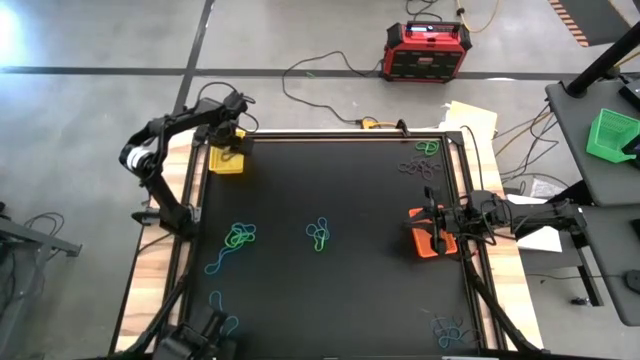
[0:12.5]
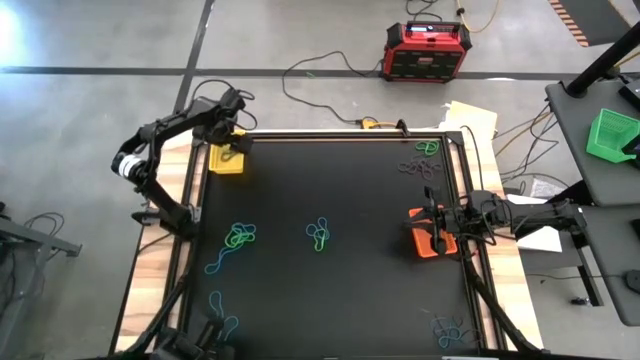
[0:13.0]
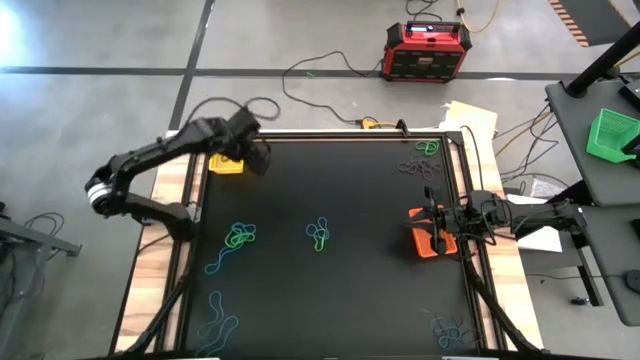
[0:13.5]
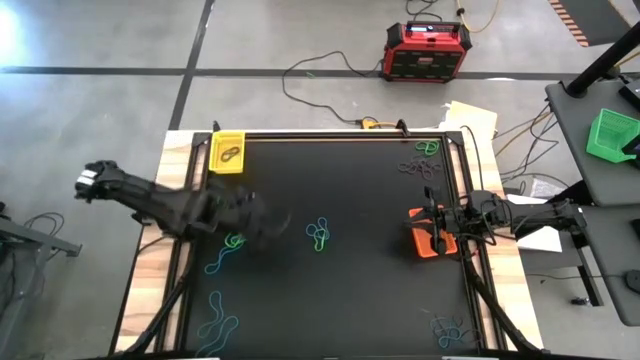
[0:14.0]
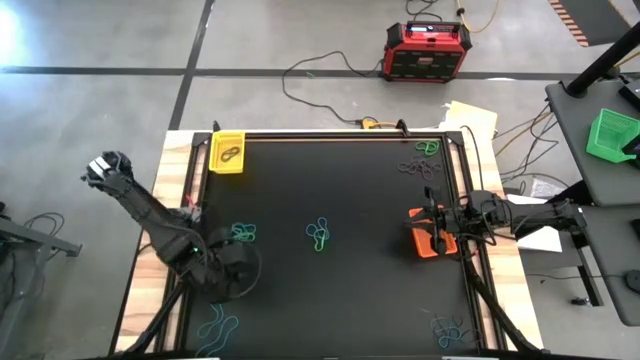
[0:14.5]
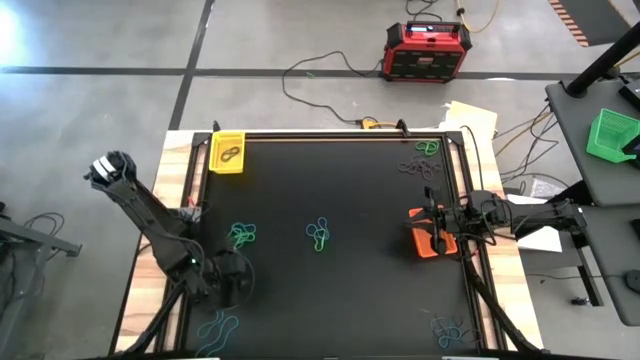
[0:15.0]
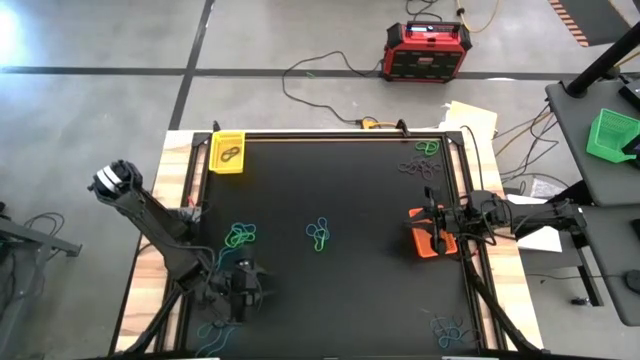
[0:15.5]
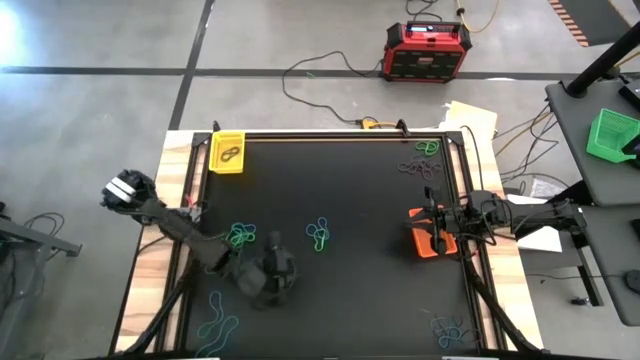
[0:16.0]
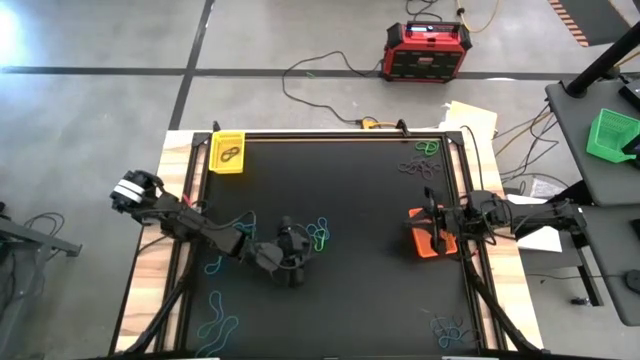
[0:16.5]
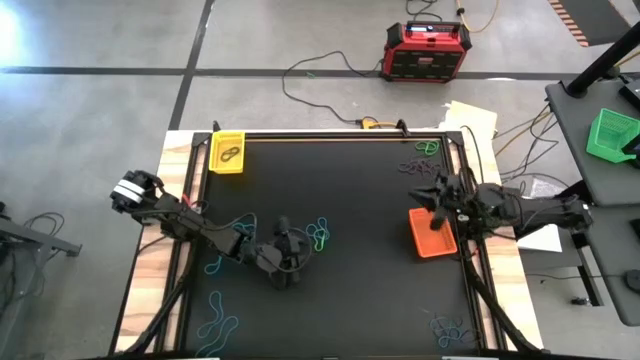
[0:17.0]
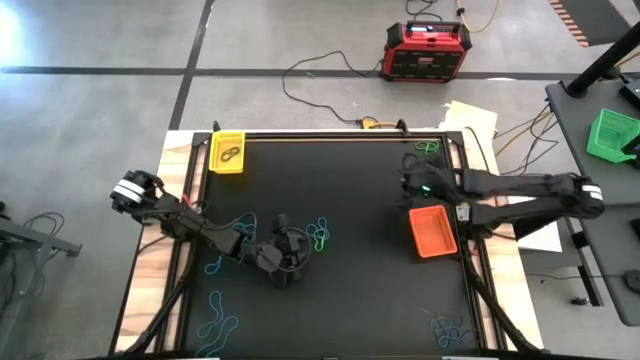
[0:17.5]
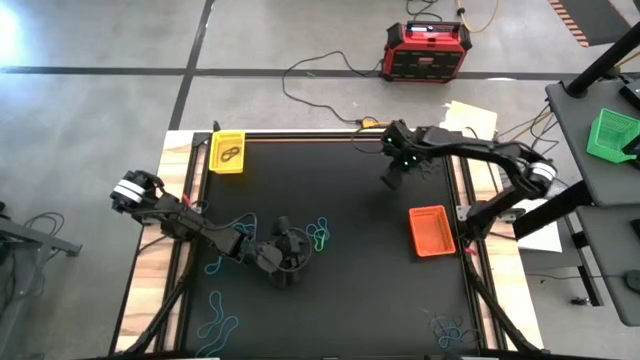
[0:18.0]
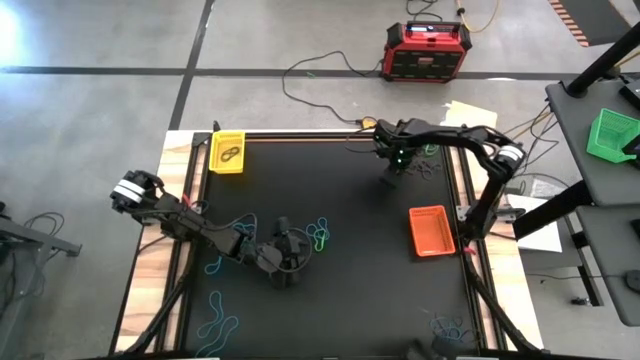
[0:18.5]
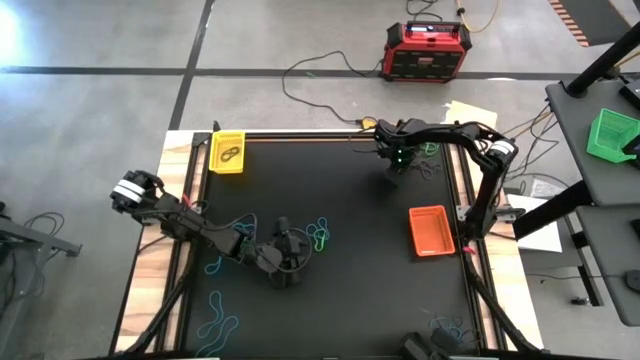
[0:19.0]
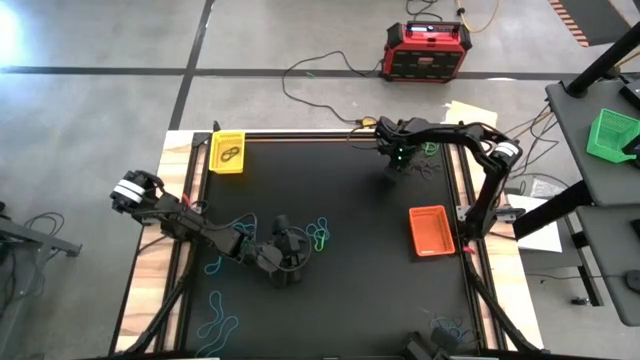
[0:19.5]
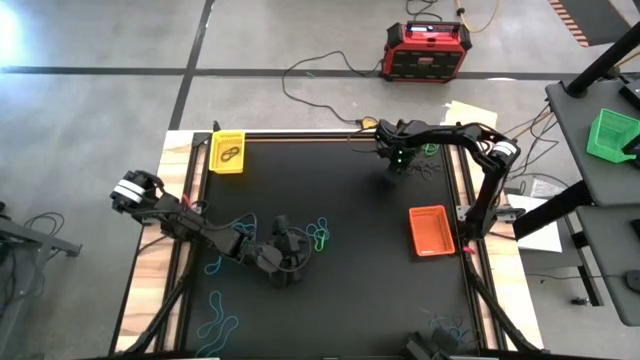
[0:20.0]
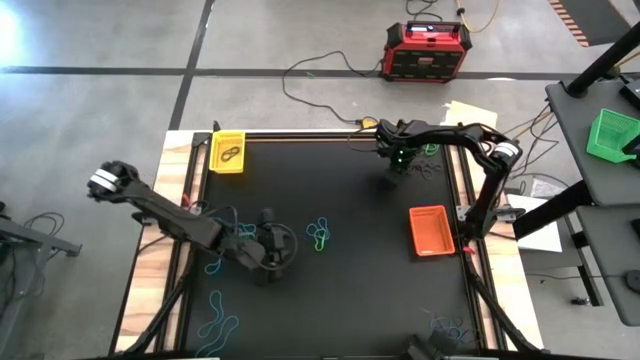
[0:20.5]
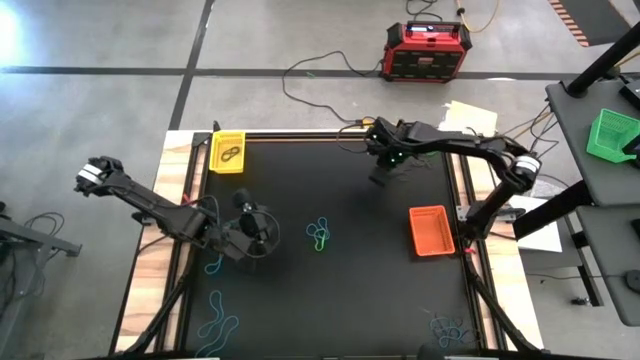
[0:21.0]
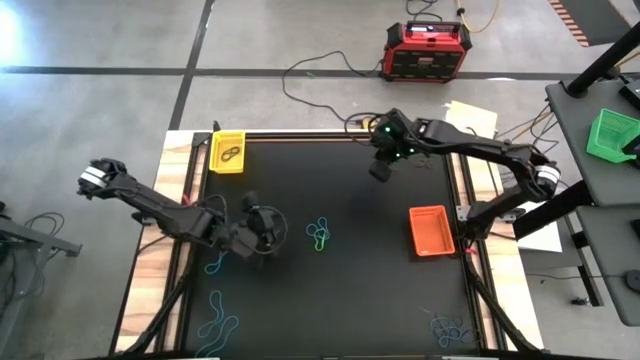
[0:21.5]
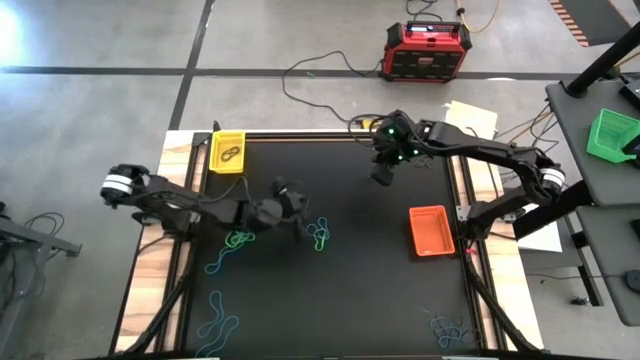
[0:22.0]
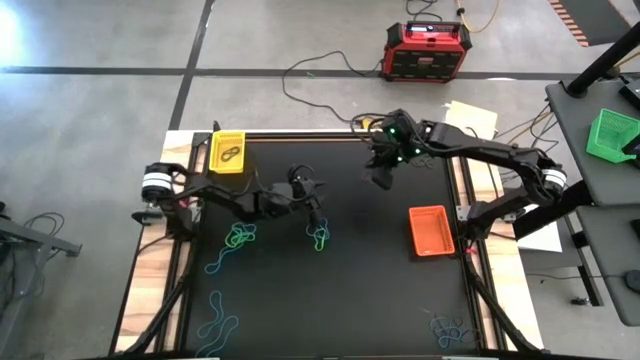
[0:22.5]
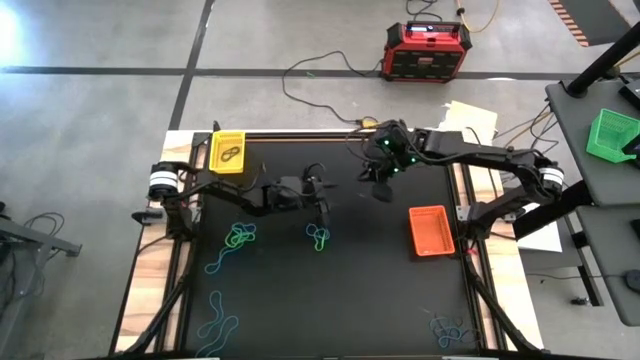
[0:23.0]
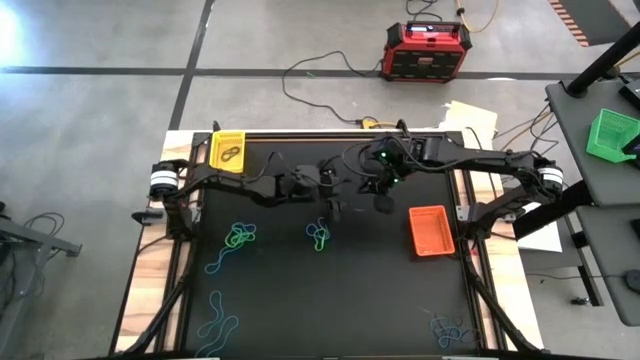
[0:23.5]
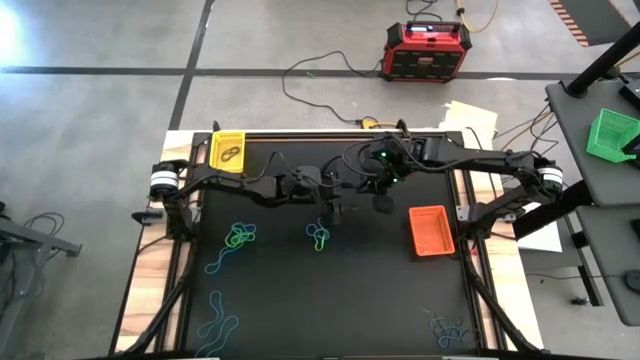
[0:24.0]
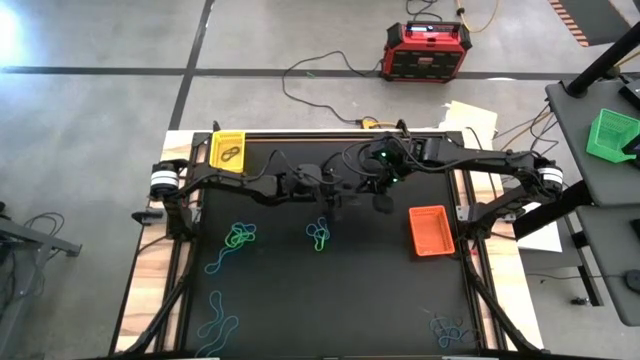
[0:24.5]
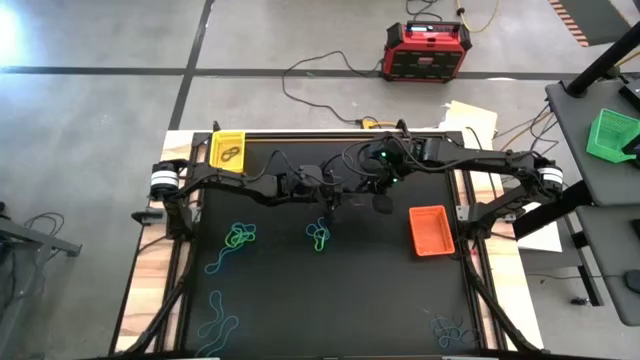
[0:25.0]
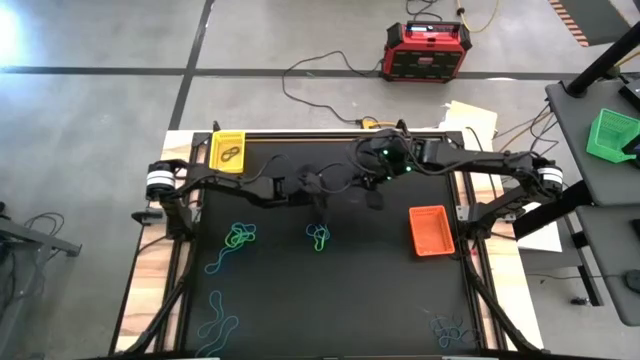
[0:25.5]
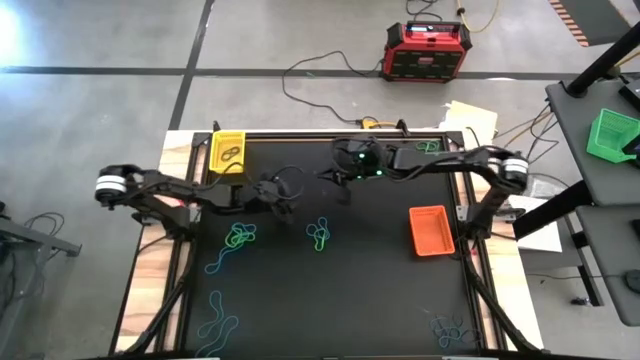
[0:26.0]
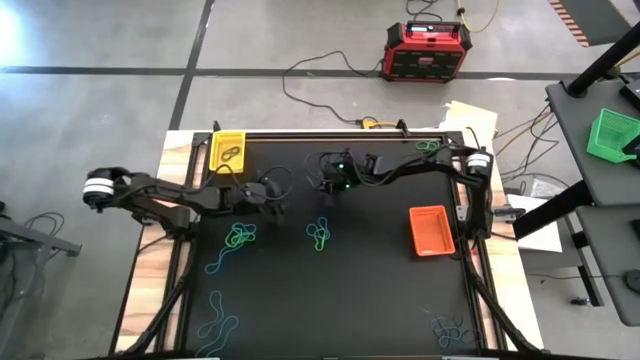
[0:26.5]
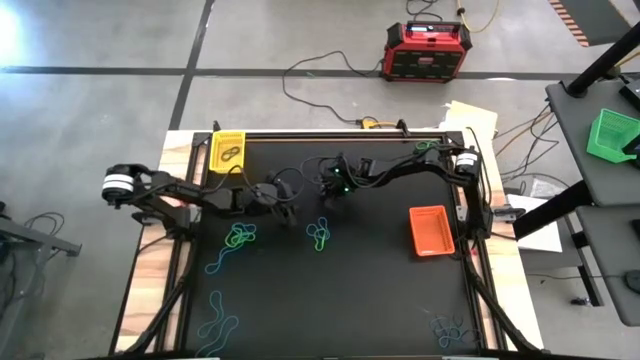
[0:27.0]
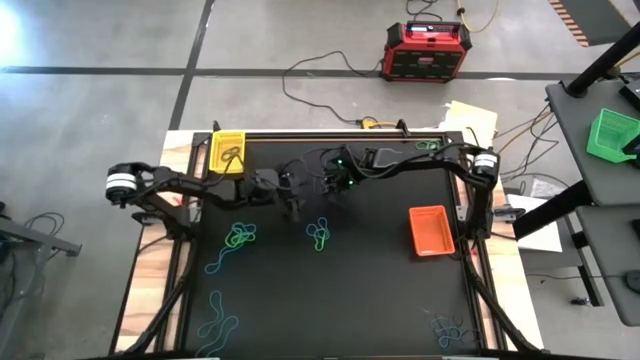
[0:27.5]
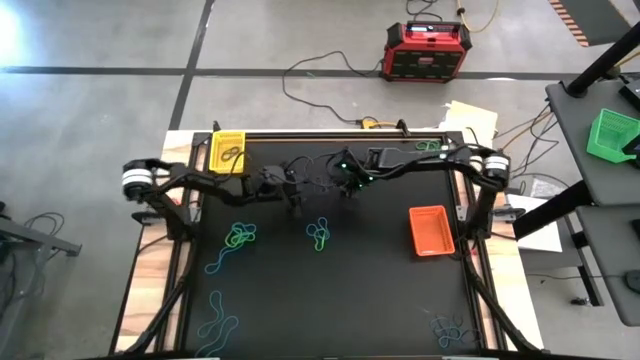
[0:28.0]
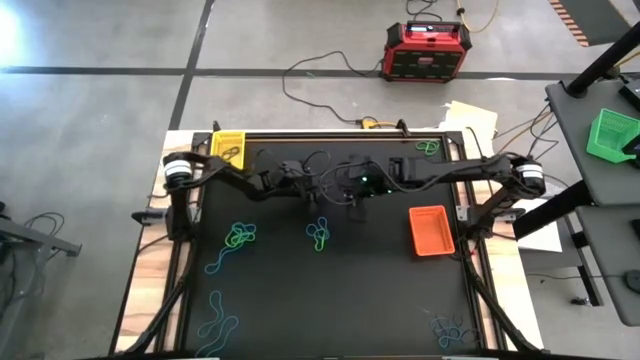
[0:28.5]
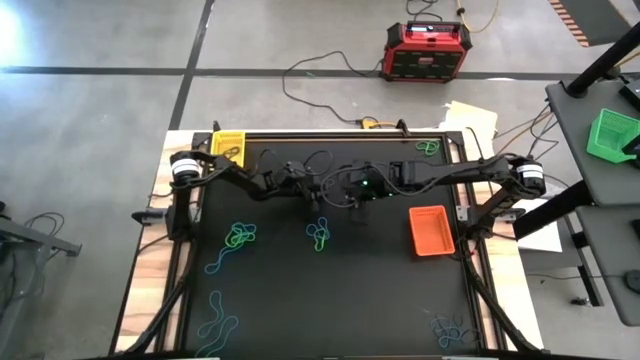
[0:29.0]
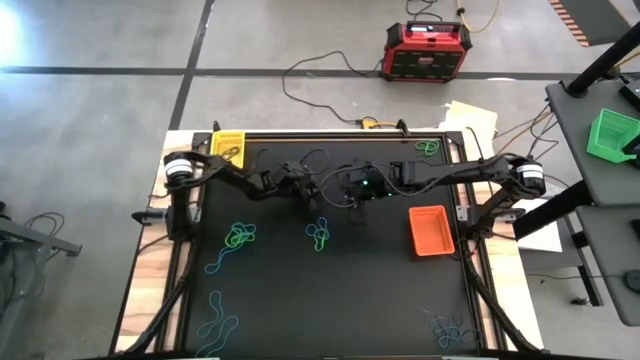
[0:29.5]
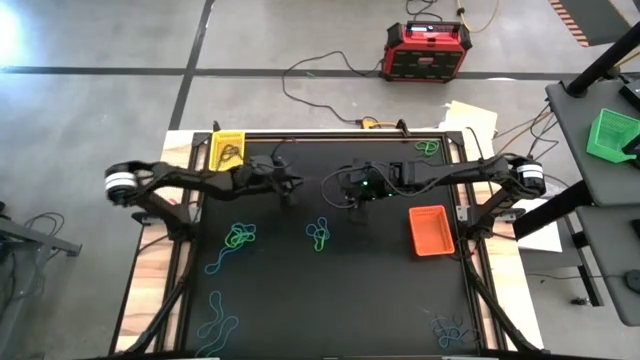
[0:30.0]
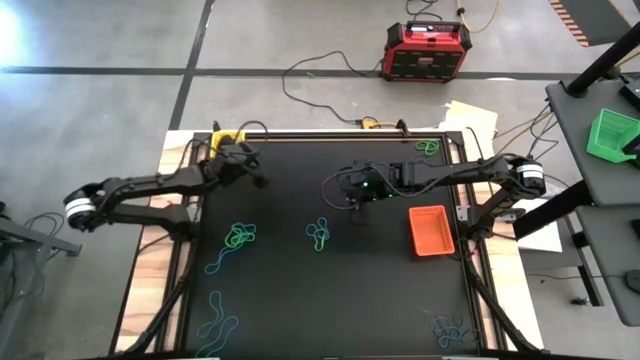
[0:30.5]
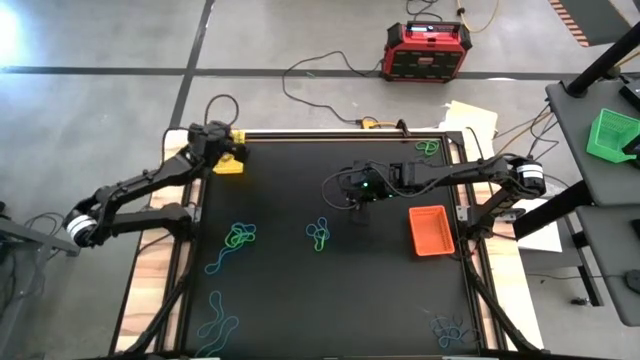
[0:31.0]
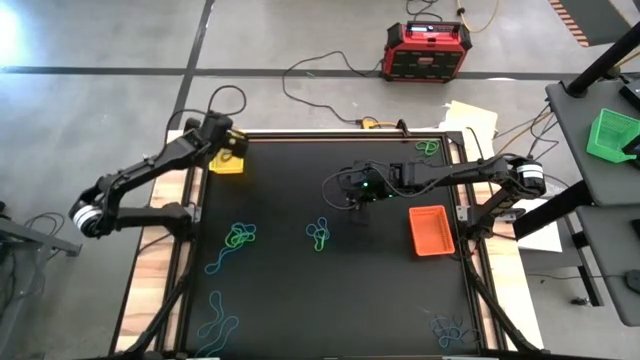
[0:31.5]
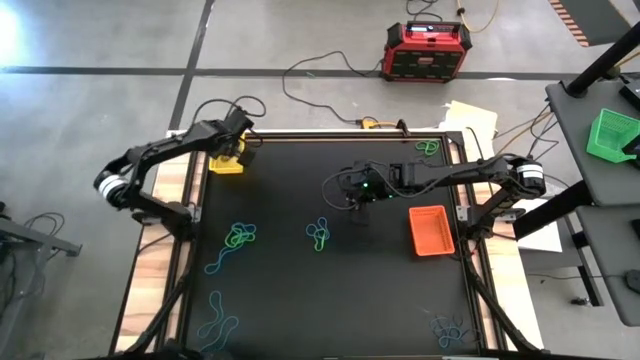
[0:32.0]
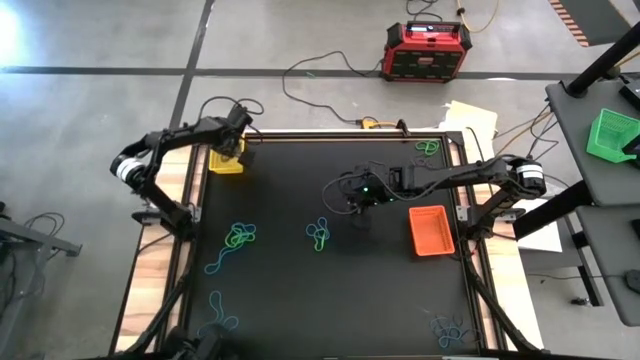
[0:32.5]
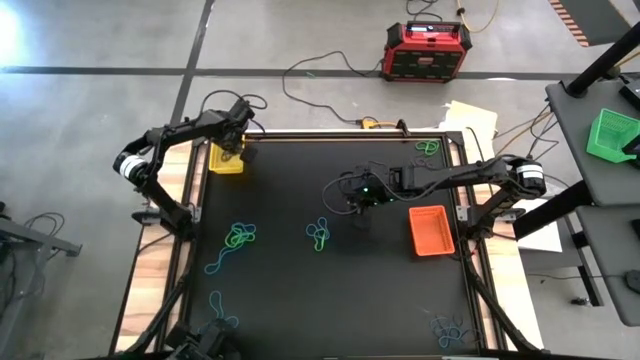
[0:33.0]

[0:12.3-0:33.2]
Task: Sort rubber bands into baskets
Put the purple rubber band into the yellow bin
